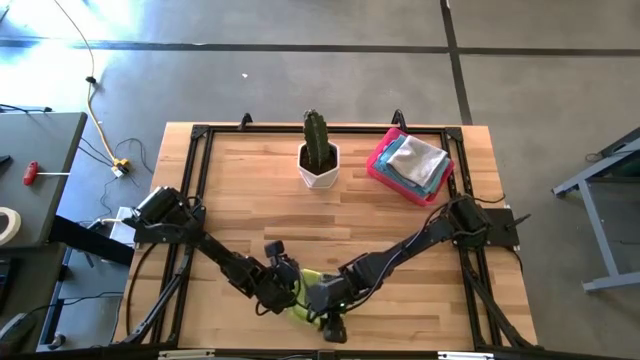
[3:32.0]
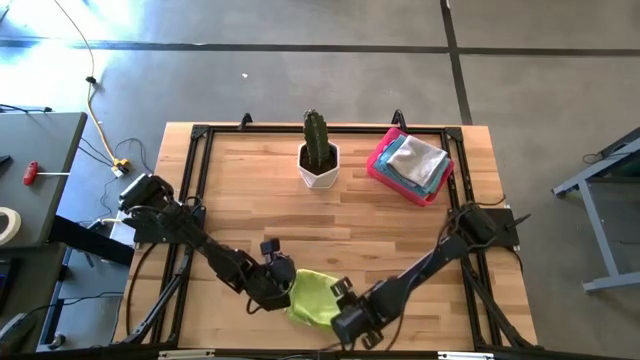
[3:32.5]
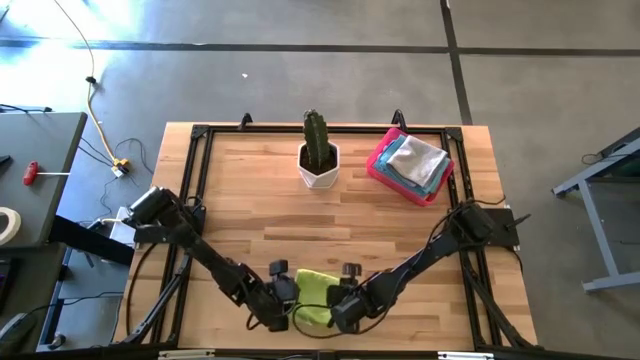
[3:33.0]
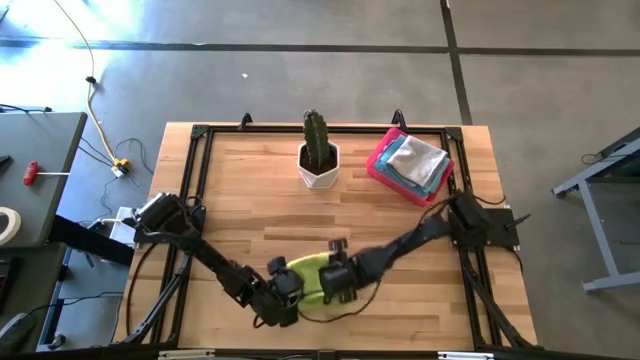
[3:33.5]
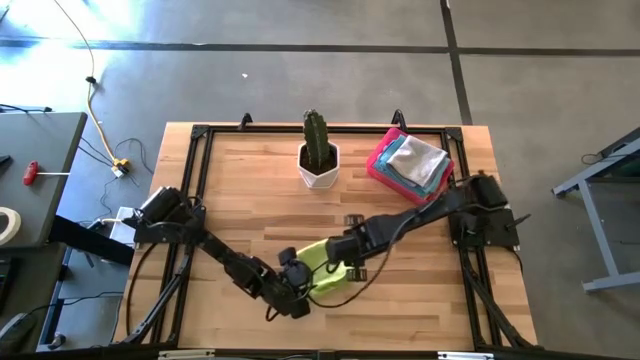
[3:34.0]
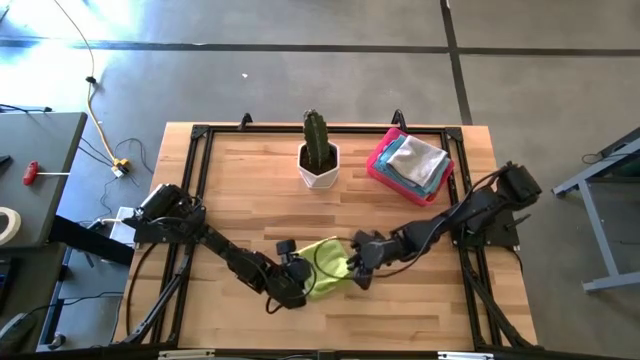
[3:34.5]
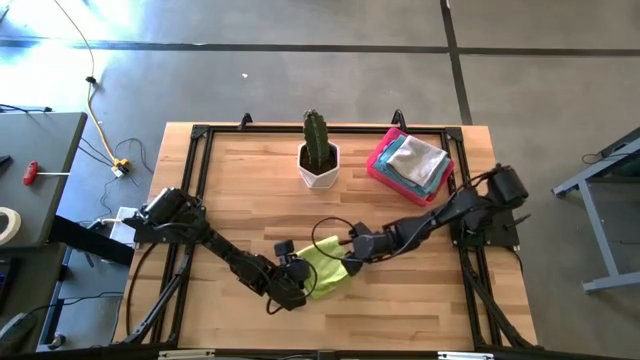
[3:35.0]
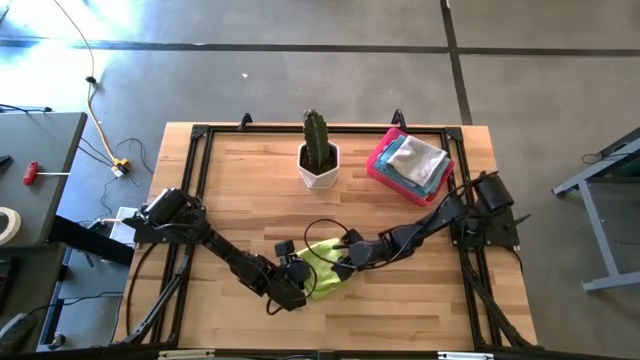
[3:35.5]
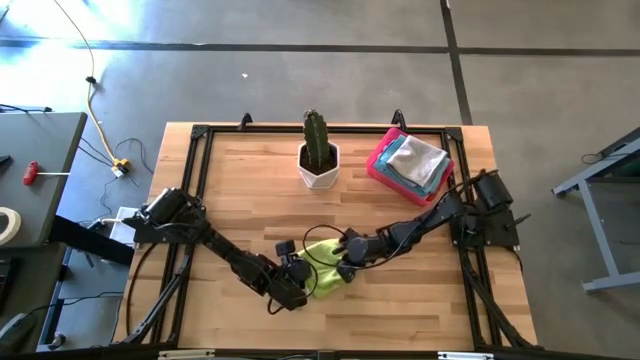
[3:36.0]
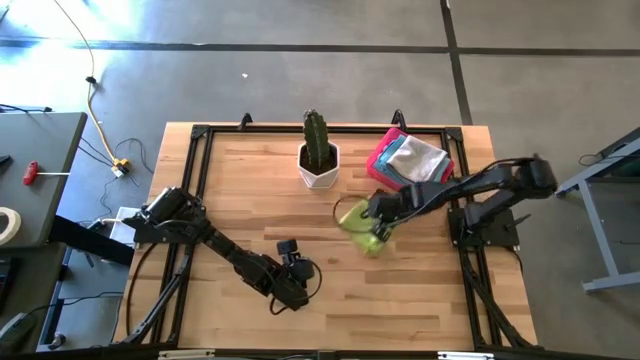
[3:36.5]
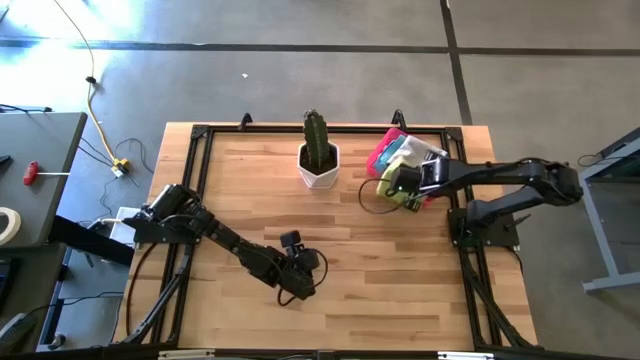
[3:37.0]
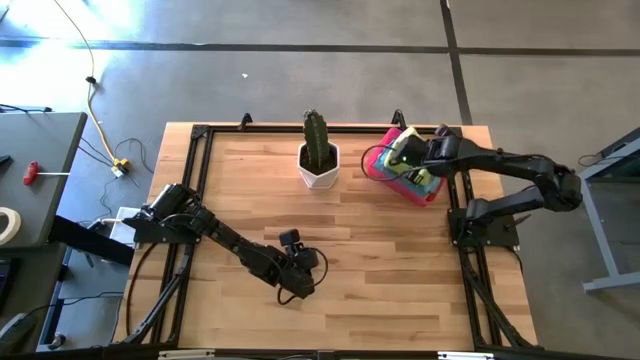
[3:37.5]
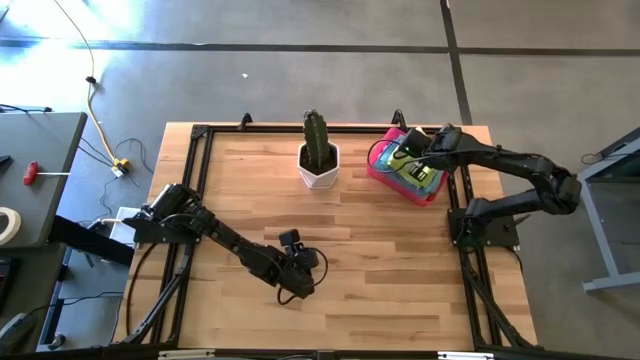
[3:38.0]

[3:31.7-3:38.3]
Task: Fold microfiber towels
Put the green microfiber towel into the red bin

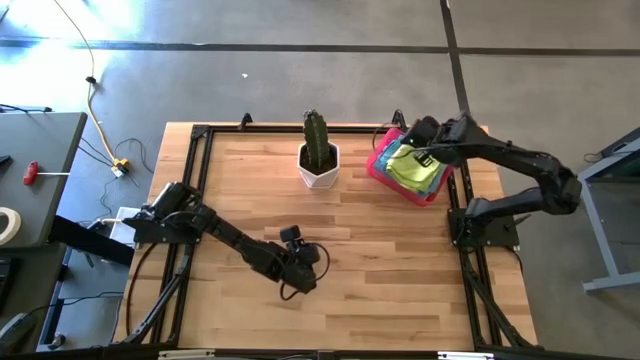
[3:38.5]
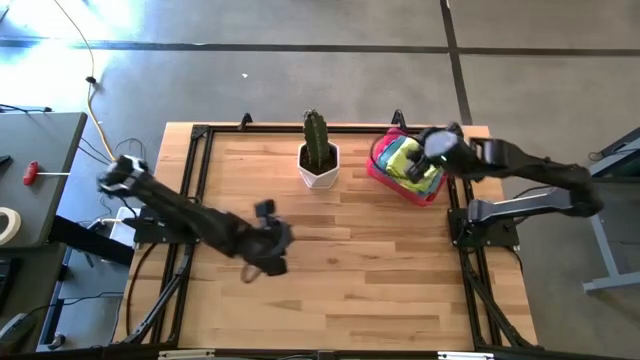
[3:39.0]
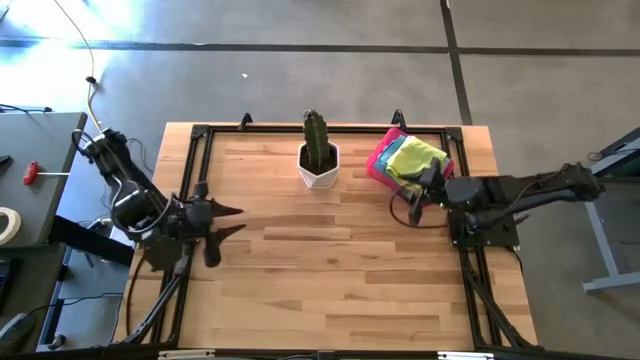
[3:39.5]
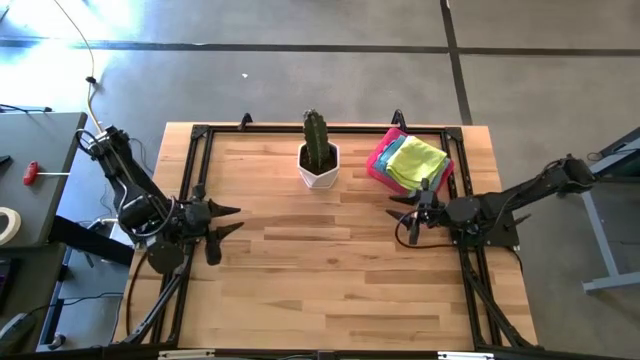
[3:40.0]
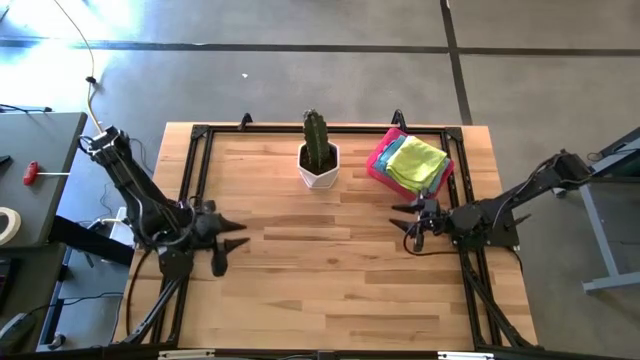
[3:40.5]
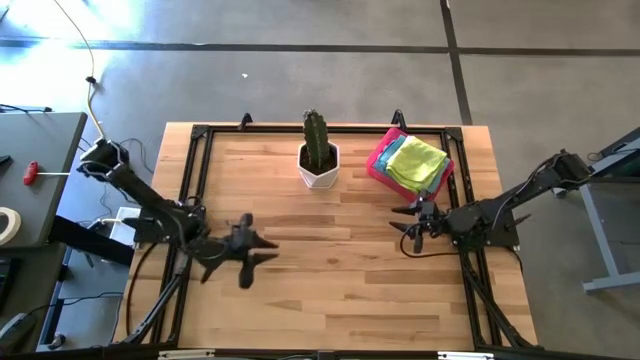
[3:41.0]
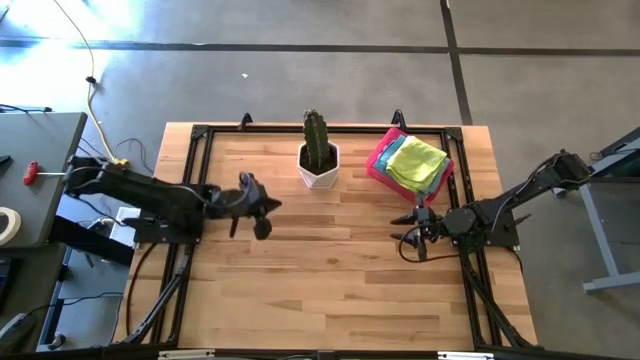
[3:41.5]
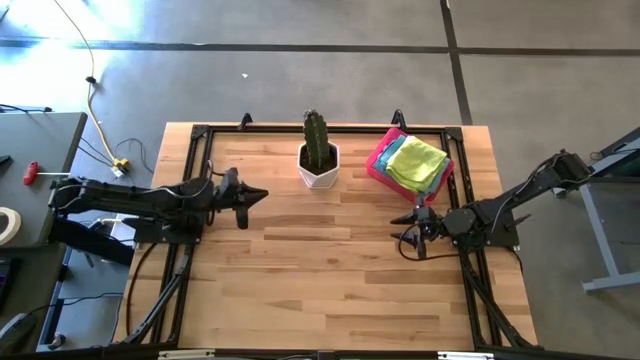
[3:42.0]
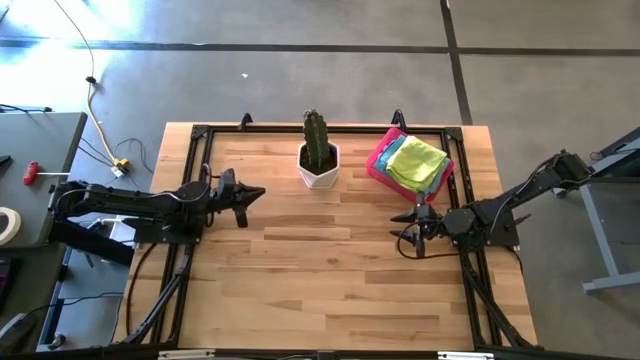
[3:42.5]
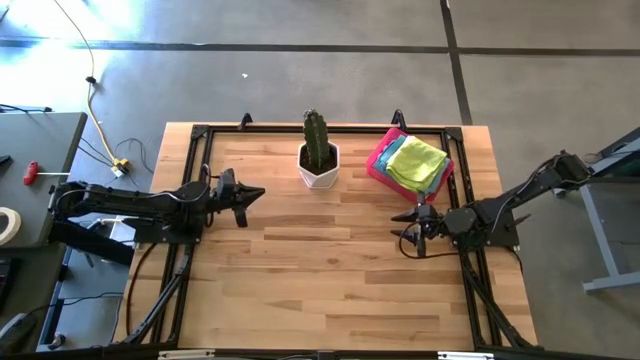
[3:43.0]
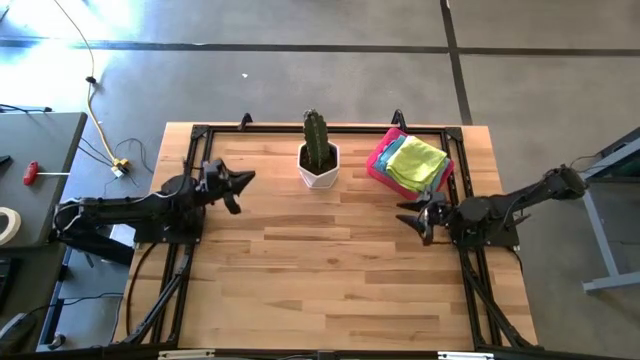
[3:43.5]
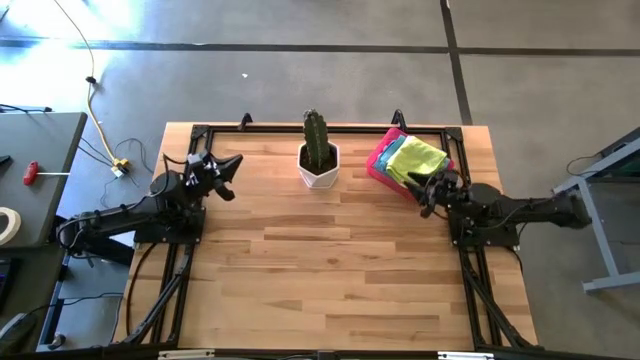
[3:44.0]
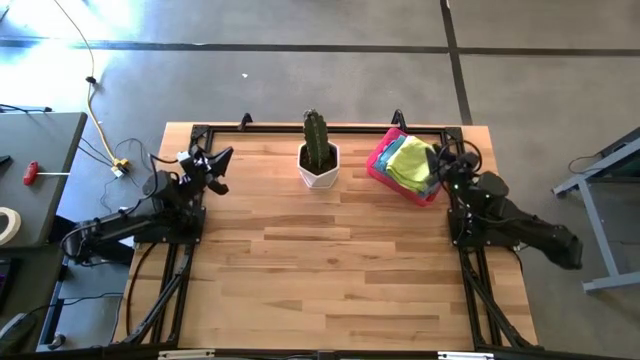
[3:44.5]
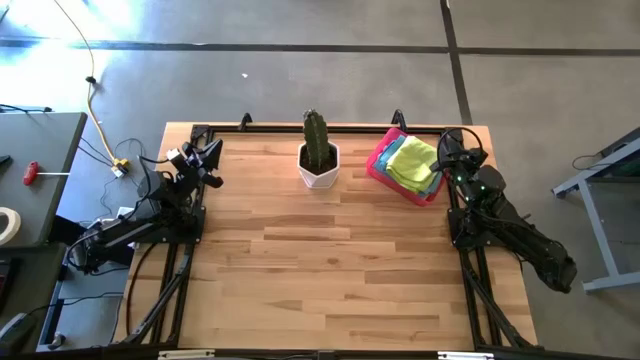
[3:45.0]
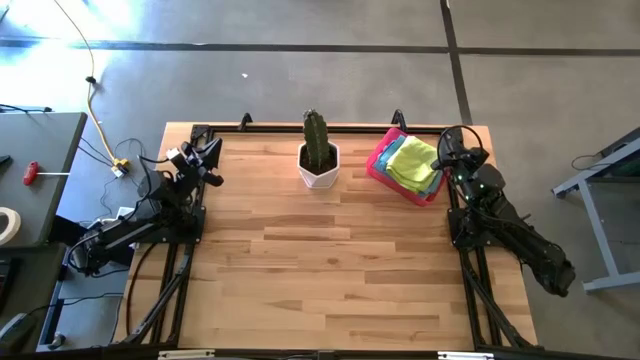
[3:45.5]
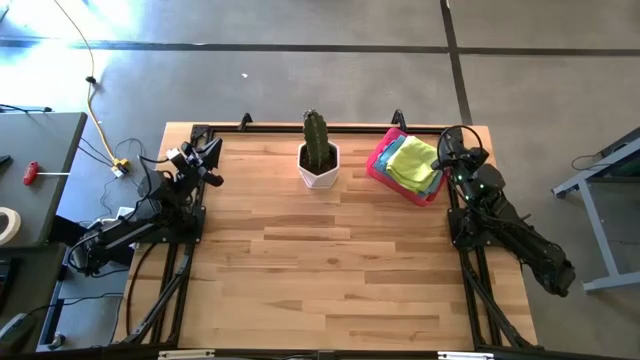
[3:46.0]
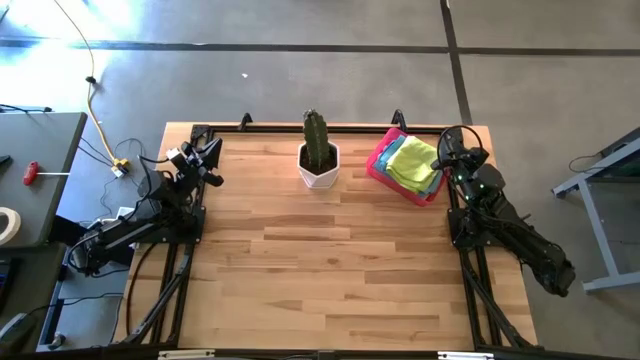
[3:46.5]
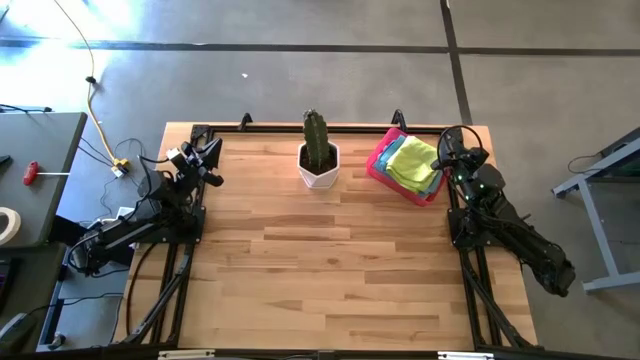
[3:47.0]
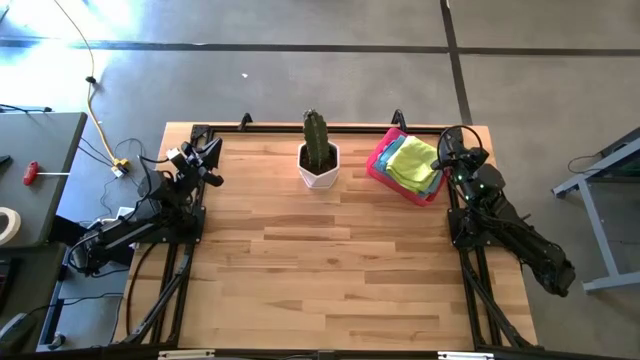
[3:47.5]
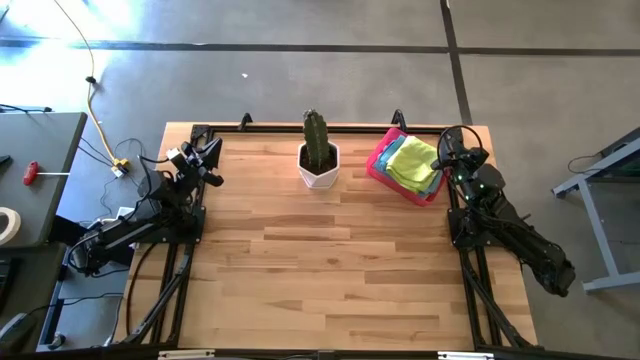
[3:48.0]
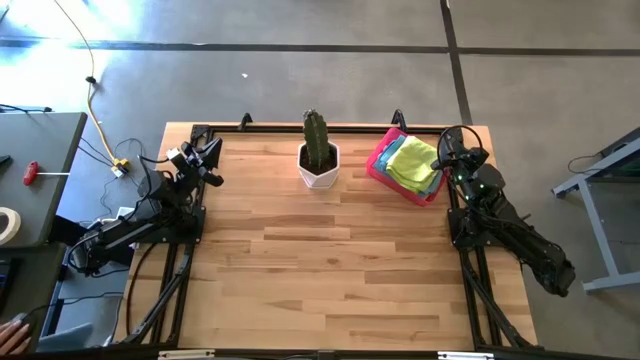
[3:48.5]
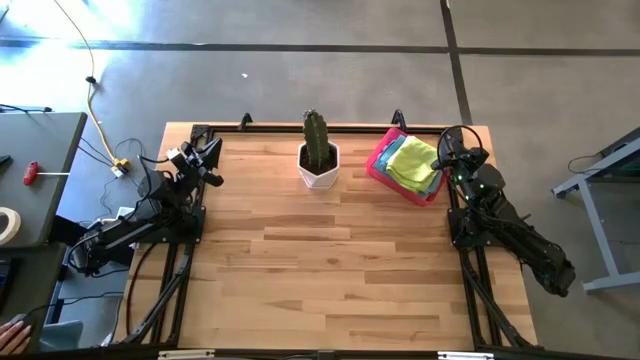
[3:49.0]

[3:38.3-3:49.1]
Return to Home Position

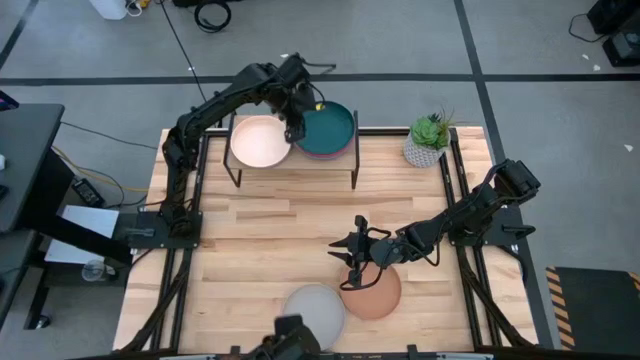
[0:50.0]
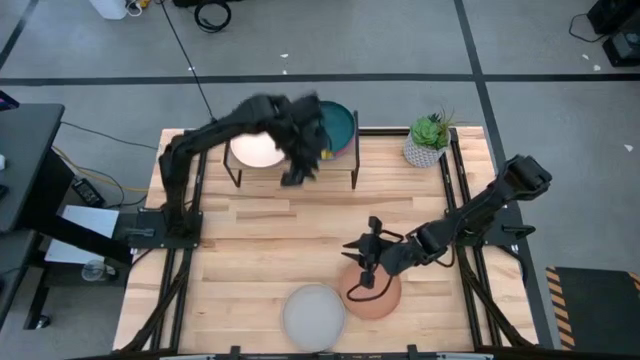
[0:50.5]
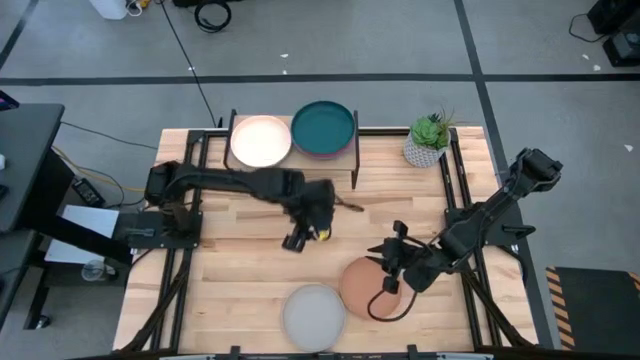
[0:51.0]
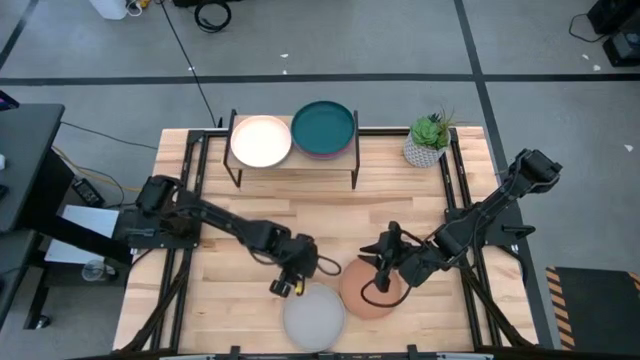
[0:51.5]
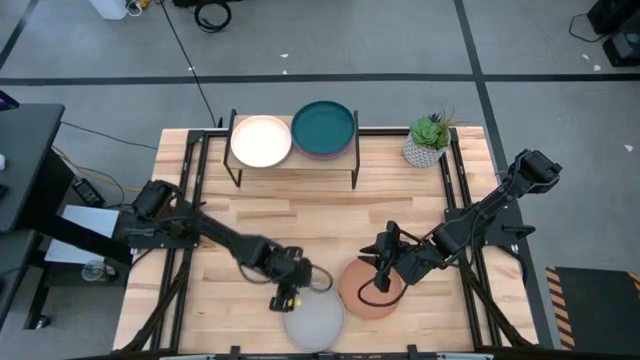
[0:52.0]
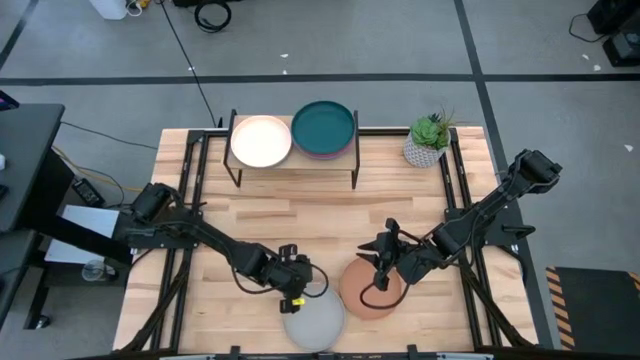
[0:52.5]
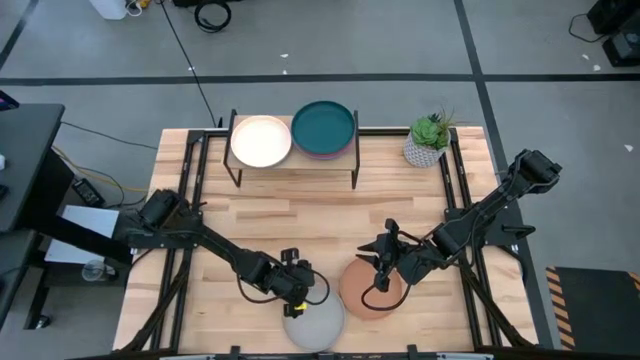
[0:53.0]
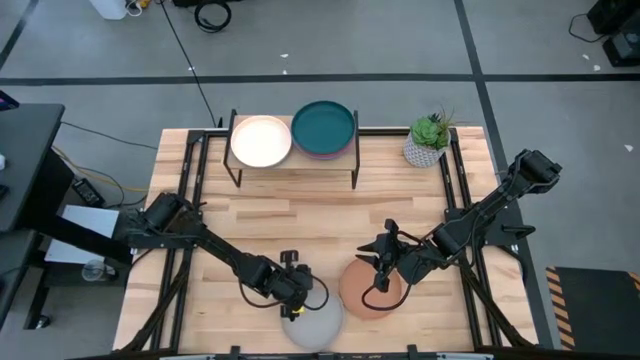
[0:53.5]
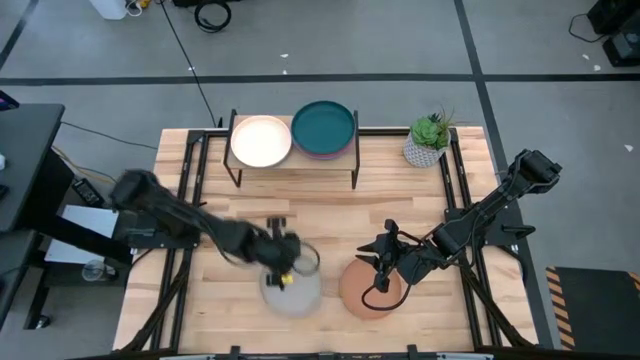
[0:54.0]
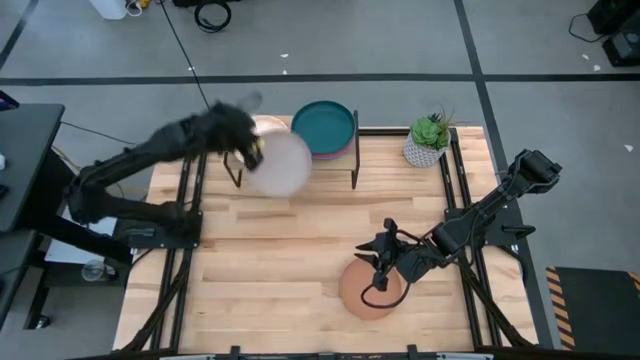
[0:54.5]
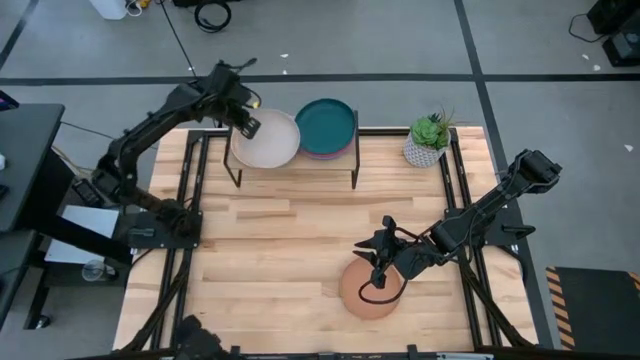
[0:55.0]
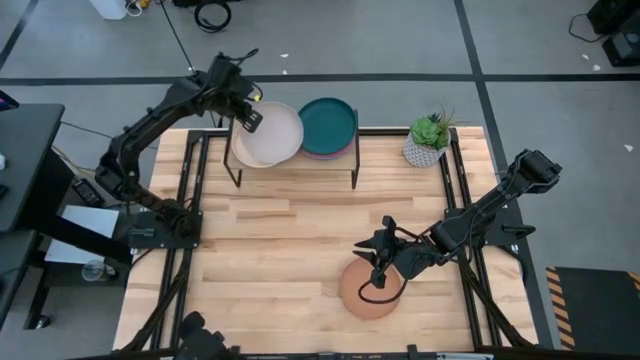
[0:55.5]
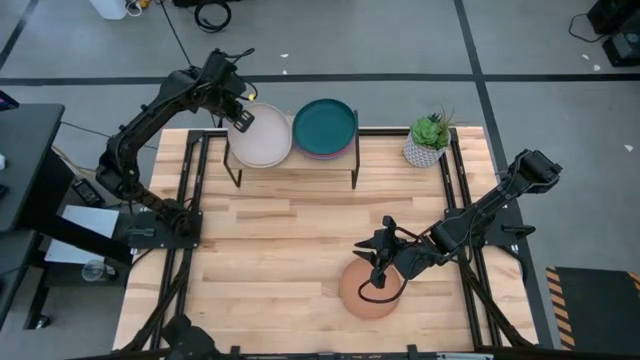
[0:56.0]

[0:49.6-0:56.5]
Task: Place and stack plates onto a shelf
Stack the gray plate on top of the light orange plate on the shelf
